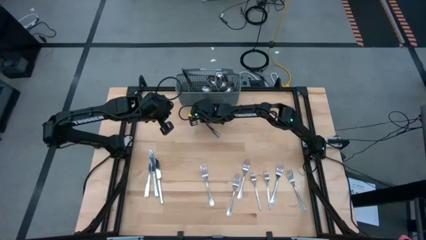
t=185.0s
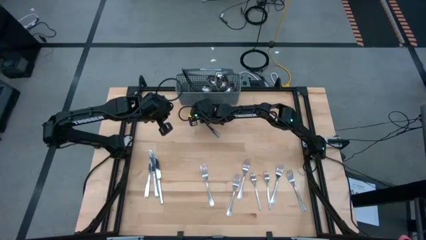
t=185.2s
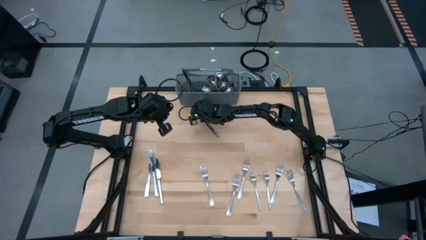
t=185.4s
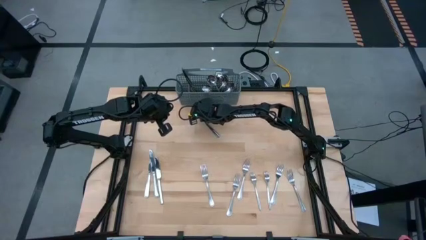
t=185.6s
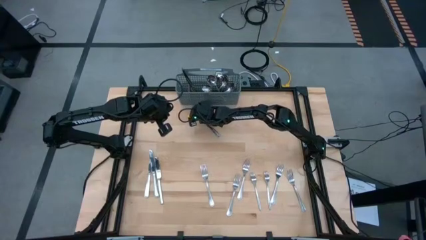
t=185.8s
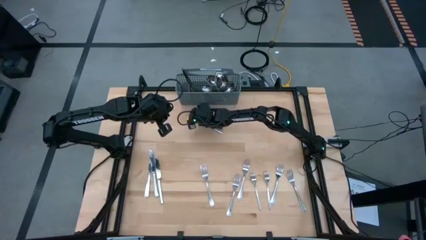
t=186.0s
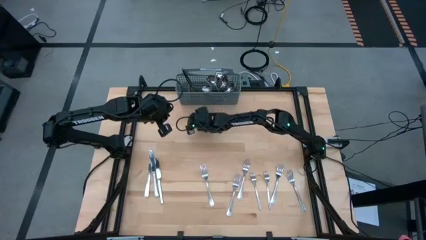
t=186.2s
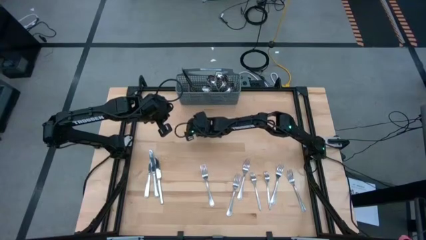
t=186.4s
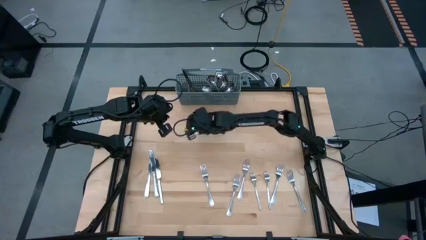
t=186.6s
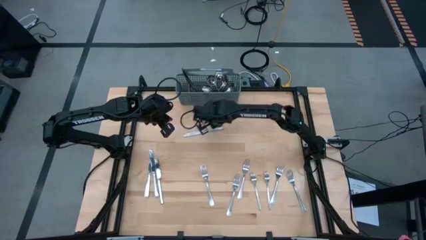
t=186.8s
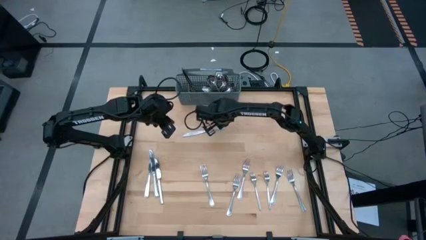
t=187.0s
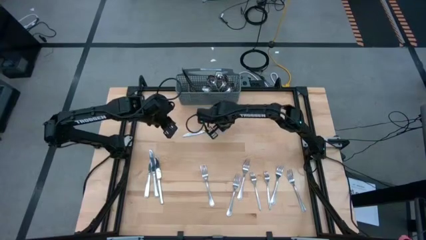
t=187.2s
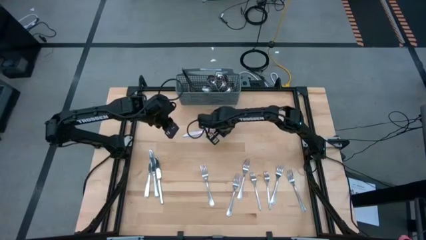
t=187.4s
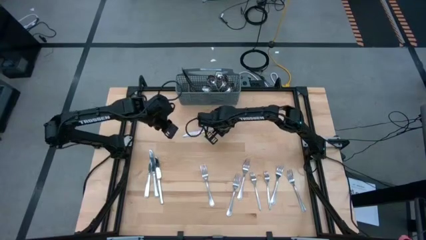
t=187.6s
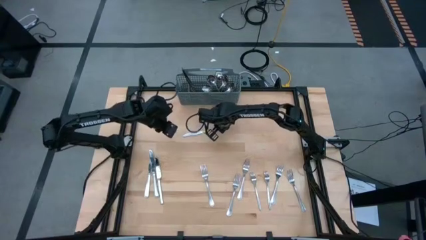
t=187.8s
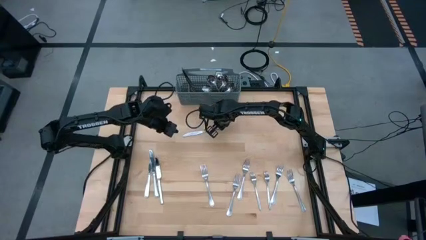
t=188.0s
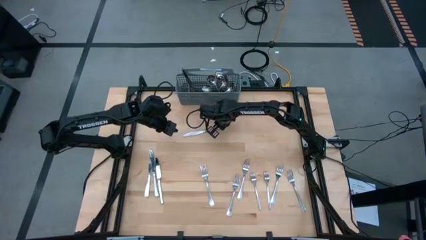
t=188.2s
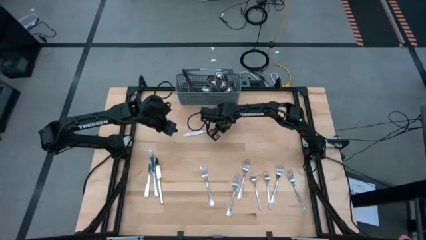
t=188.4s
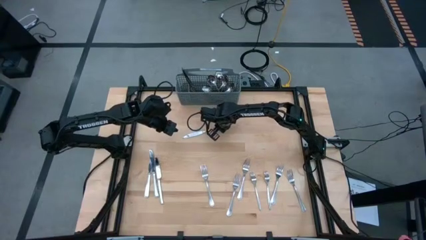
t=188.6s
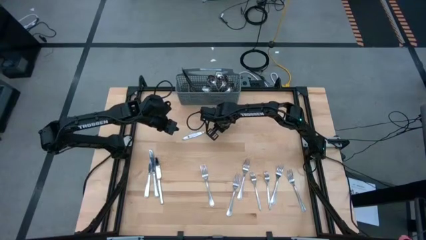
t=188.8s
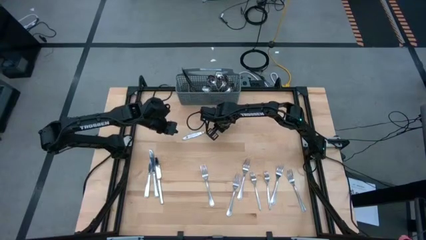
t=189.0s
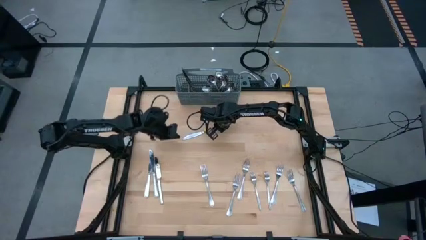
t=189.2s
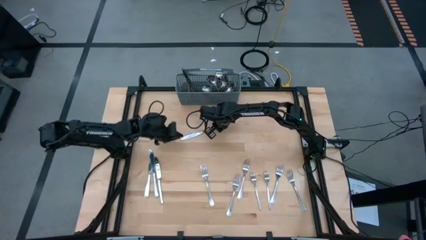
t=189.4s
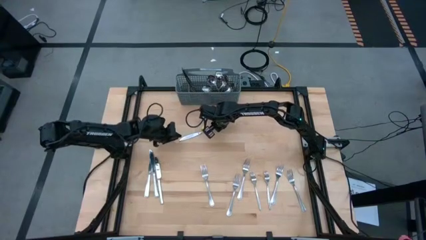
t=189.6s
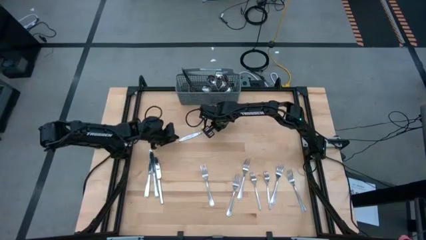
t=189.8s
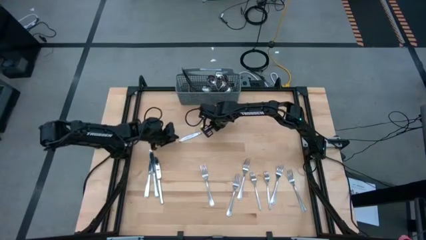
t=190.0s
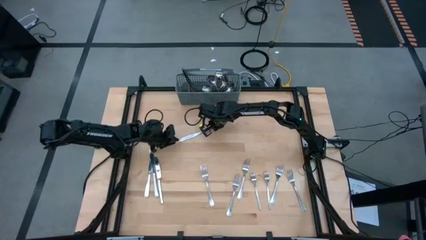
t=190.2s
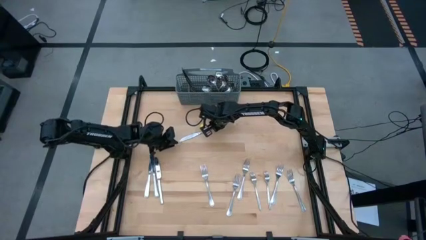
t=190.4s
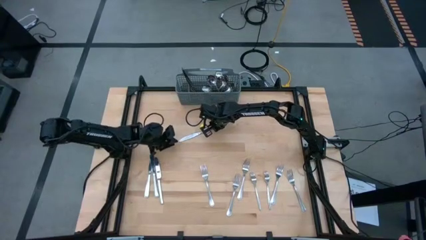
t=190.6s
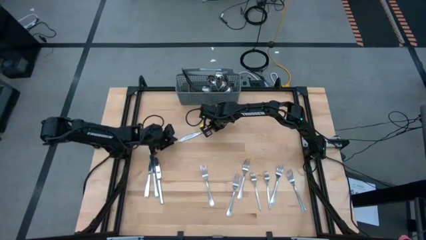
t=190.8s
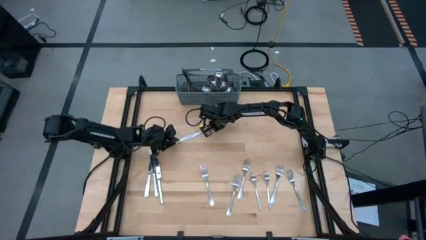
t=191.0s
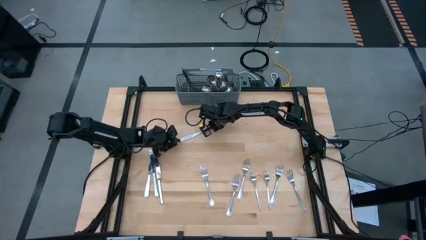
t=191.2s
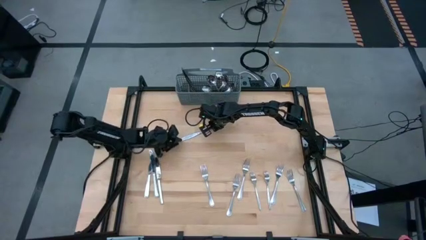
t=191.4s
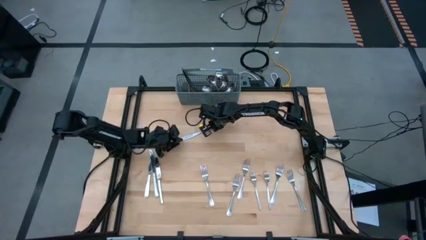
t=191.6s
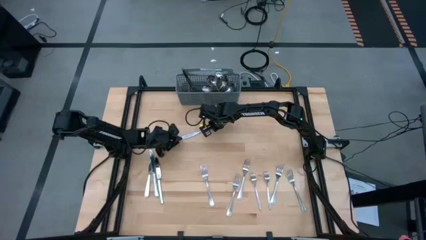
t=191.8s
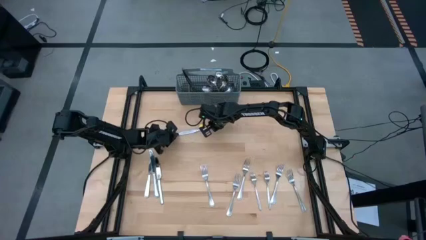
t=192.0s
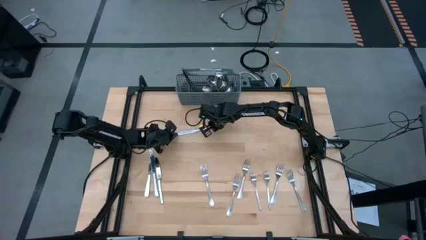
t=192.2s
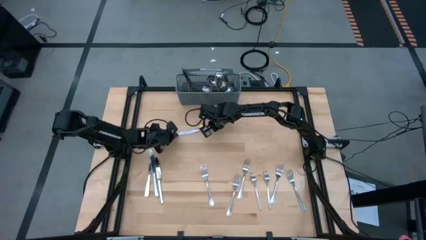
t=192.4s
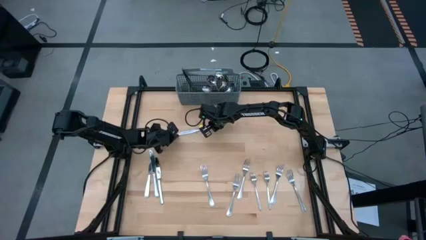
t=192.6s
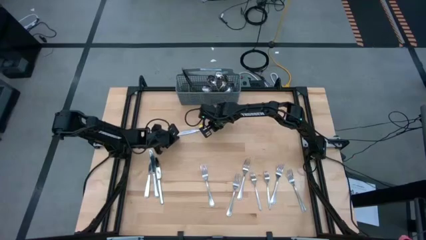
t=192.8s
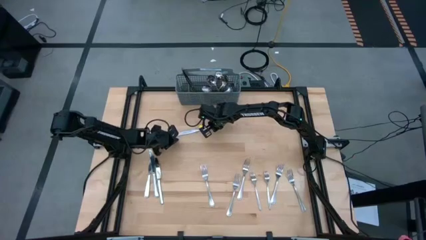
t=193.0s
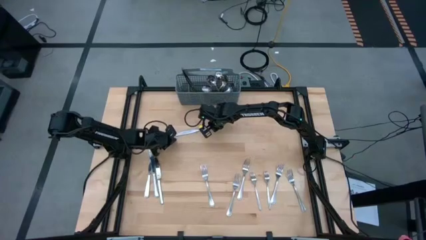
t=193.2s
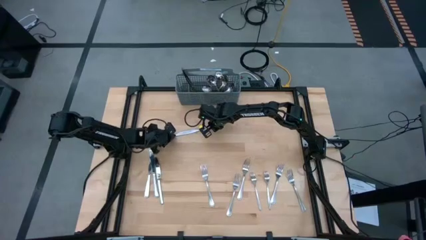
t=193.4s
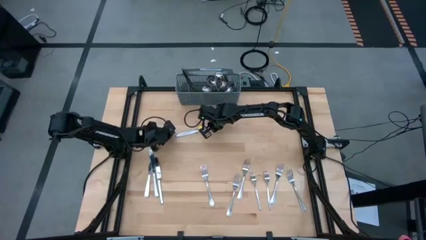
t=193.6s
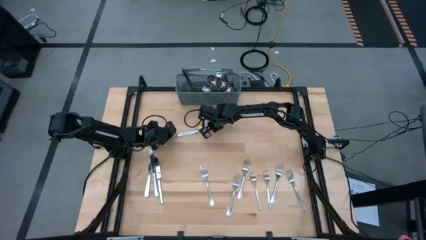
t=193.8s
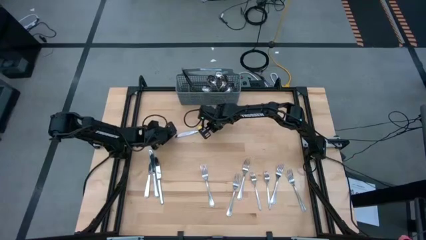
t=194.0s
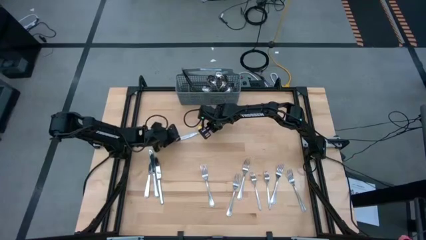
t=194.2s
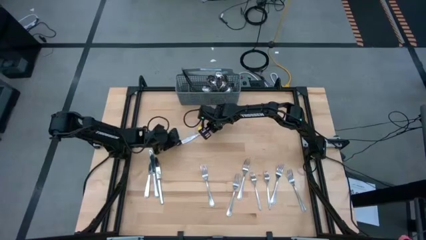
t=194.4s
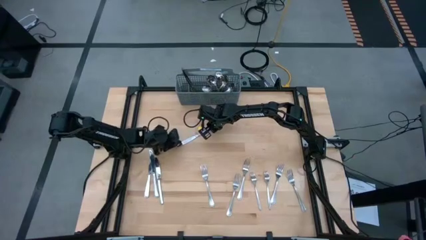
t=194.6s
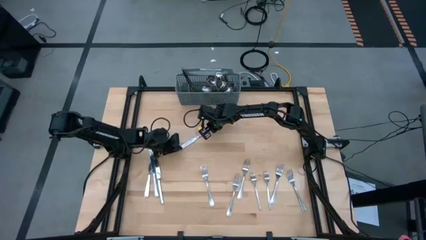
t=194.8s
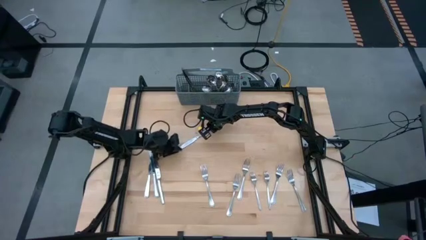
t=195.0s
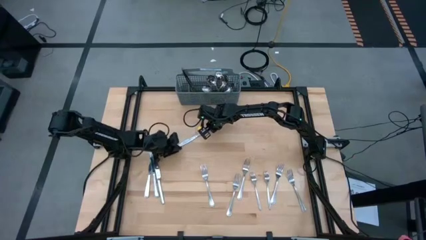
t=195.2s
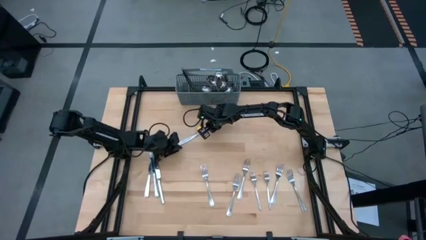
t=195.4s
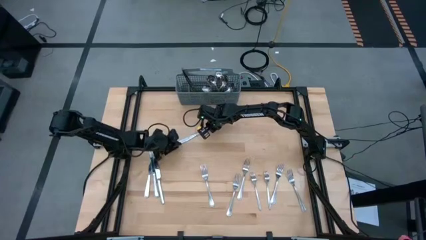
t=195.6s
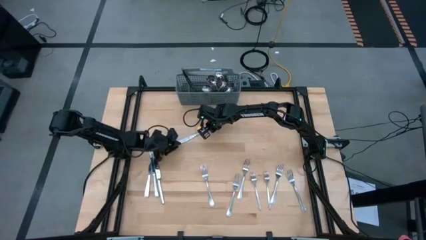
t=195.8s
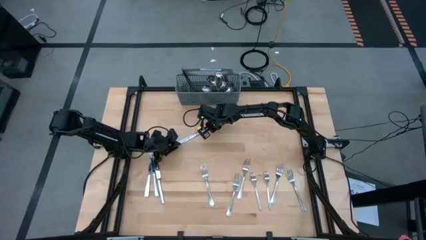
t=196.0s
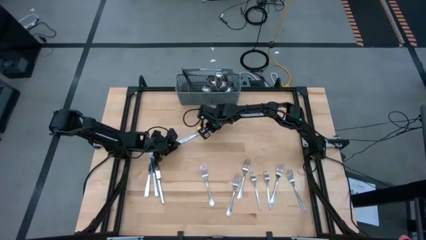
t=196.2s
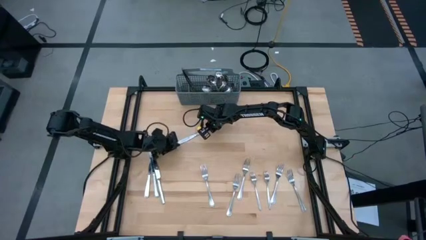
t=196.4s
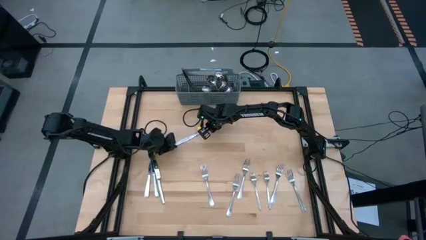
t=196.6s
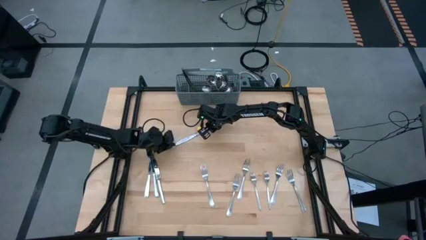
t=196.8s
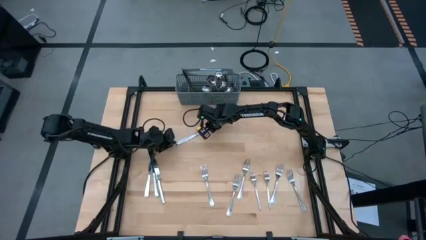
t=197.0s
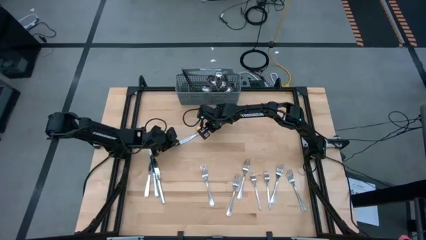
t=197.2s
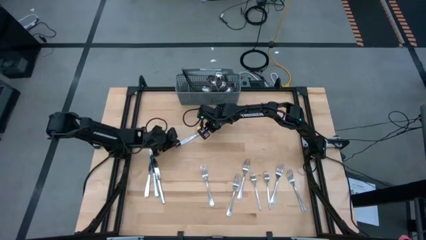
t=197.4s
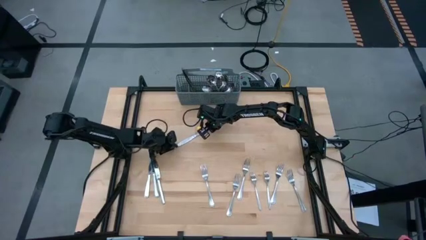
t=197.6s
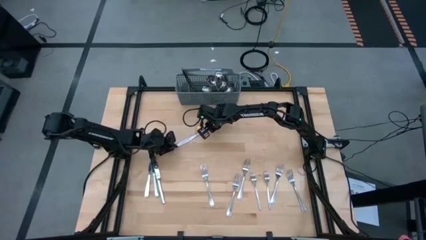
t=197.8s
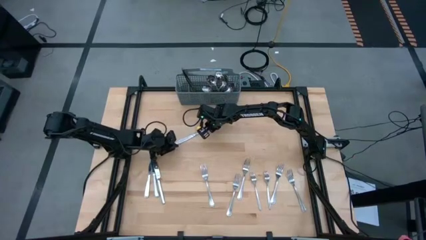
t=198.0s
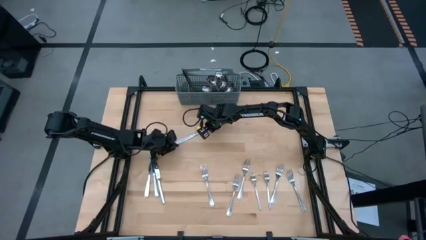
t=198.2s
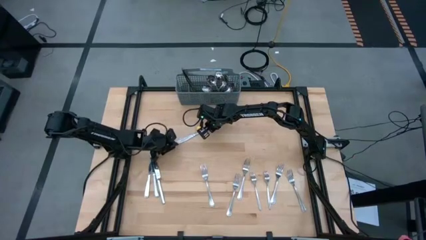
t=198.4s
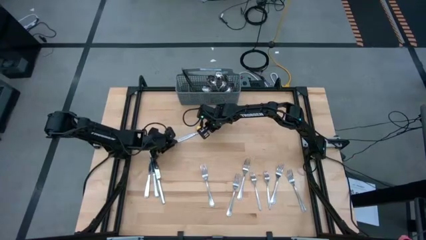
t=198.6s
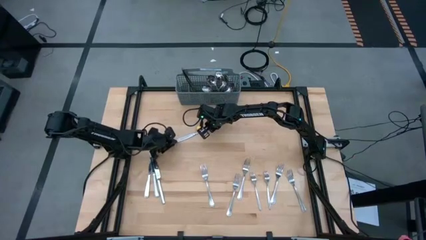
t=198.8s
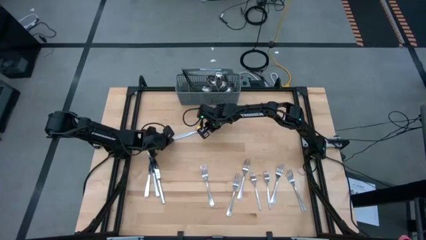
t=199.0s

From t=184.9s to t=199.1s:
Task: Sort silverware
Put the silver knife into the gray utensil holder

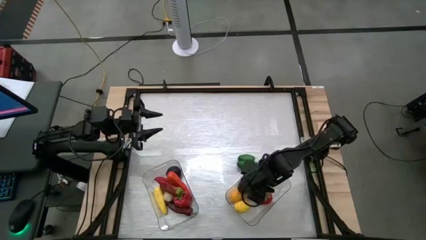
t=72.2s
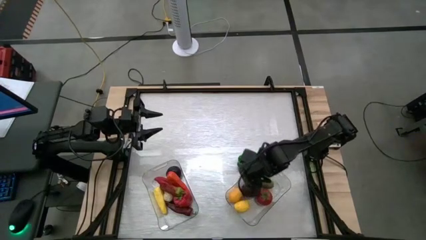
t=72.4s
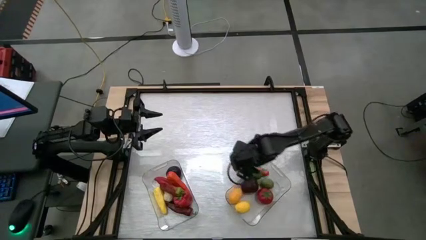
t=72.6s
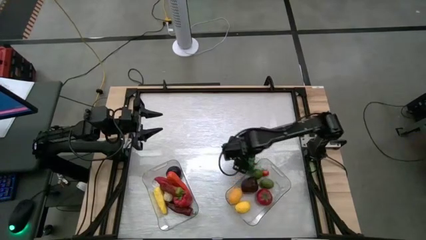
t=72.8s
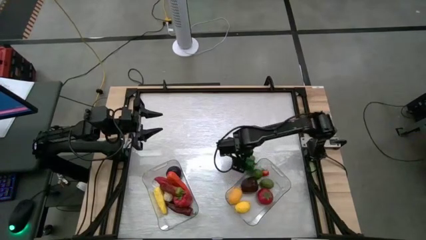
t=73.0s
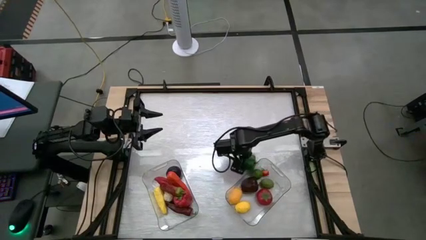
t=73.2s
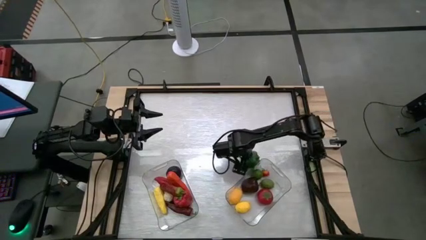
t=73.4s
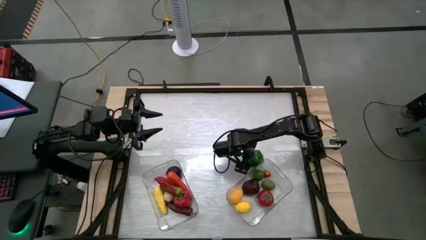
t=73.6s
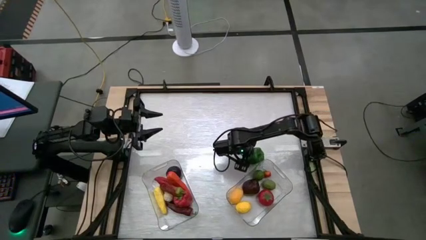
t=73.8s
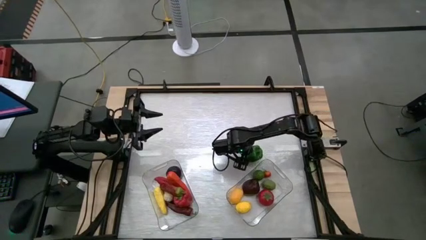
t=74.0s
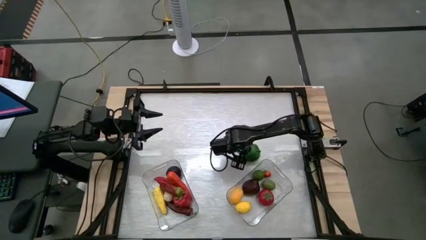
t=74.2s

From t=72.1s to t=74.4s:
Task: Sort produce into baskets
Put the green bell pepper into the left transparent bin
